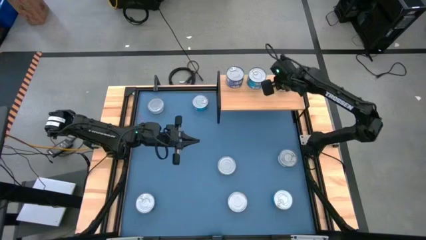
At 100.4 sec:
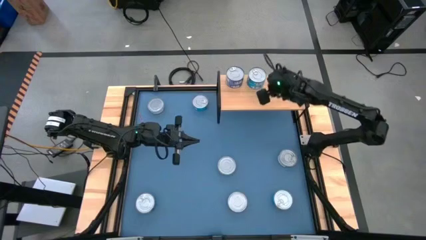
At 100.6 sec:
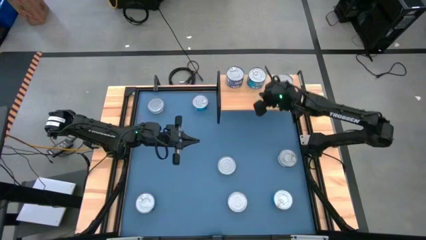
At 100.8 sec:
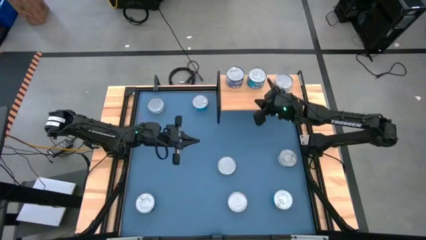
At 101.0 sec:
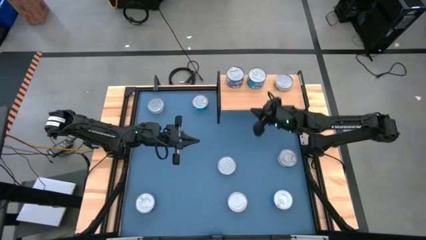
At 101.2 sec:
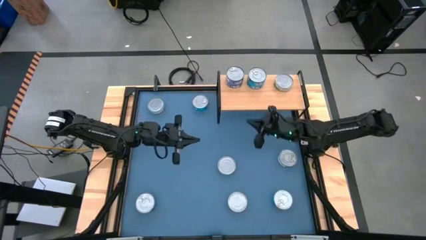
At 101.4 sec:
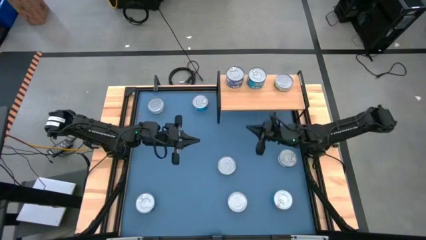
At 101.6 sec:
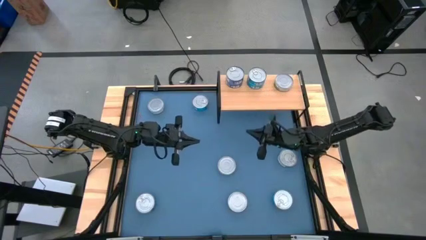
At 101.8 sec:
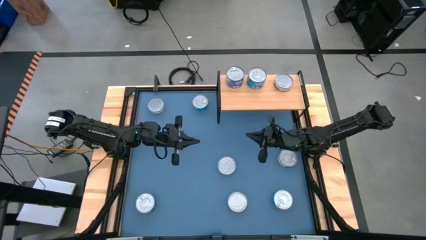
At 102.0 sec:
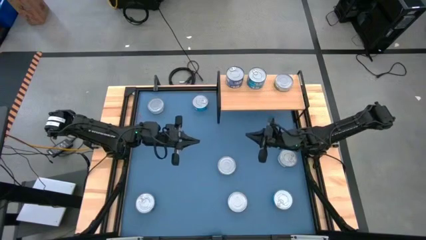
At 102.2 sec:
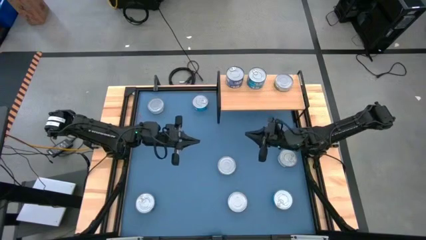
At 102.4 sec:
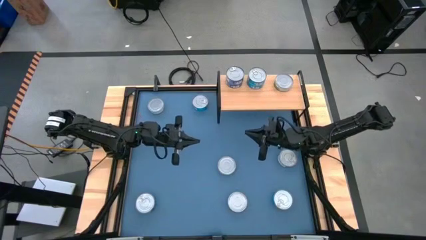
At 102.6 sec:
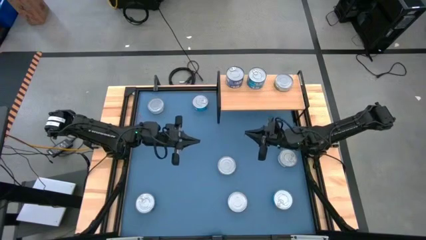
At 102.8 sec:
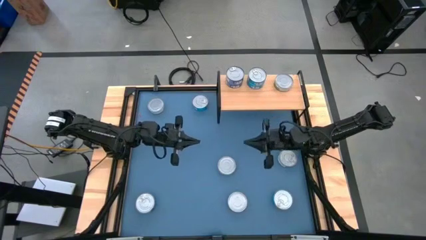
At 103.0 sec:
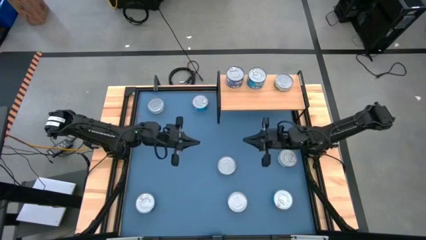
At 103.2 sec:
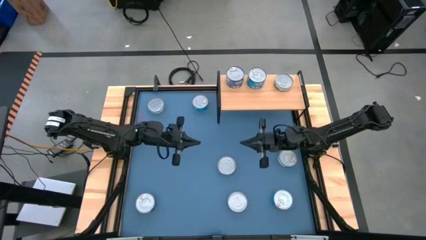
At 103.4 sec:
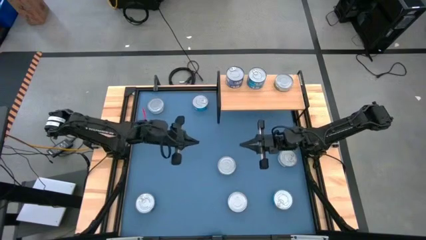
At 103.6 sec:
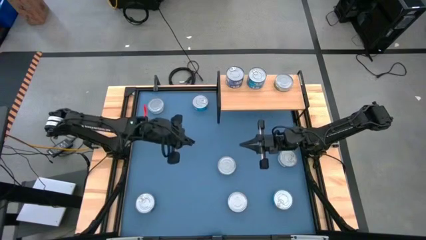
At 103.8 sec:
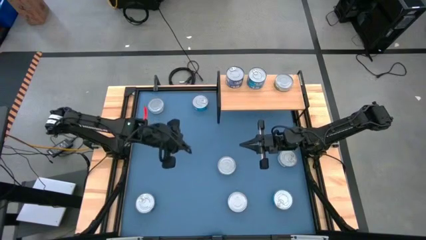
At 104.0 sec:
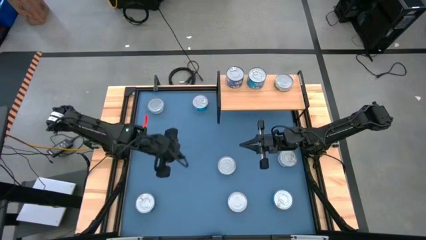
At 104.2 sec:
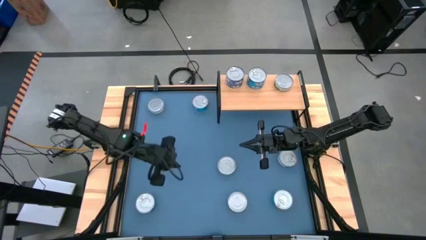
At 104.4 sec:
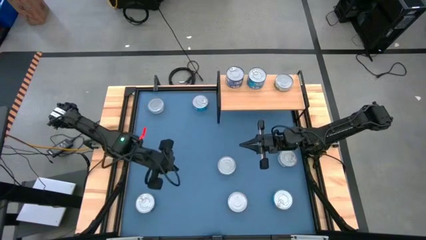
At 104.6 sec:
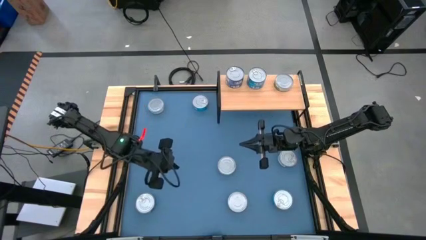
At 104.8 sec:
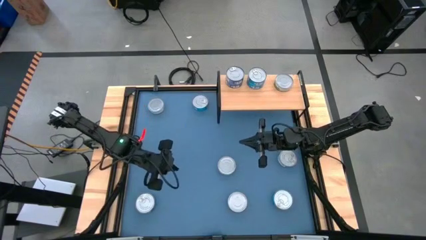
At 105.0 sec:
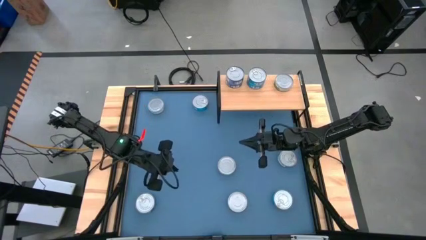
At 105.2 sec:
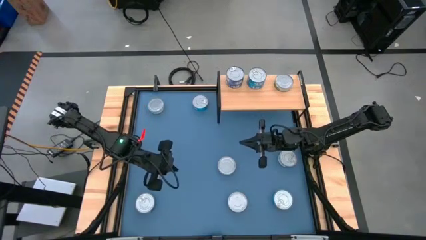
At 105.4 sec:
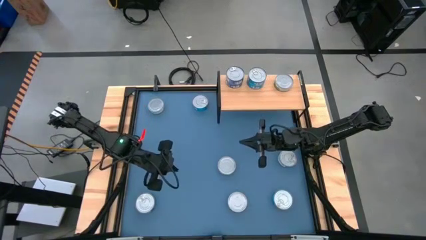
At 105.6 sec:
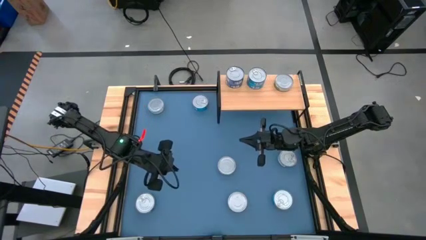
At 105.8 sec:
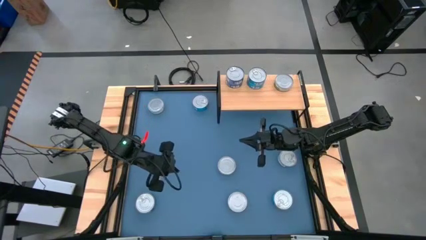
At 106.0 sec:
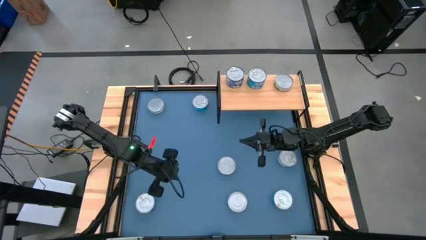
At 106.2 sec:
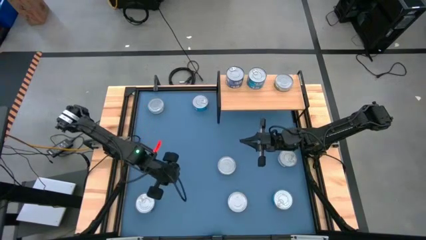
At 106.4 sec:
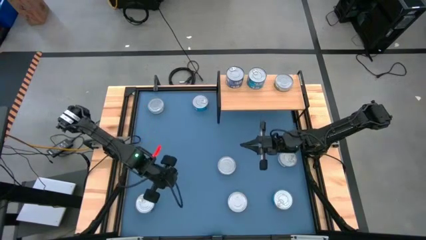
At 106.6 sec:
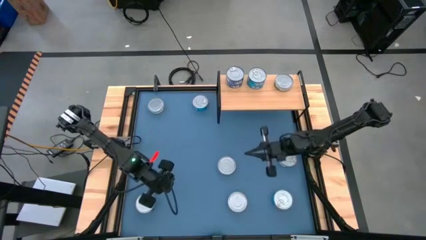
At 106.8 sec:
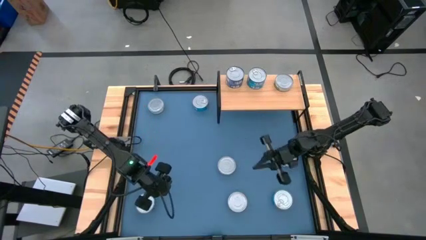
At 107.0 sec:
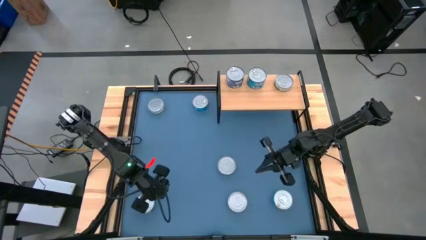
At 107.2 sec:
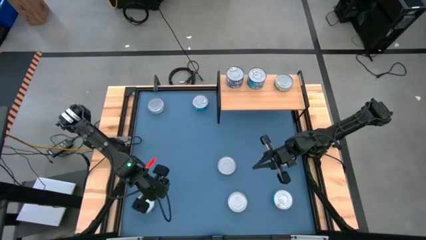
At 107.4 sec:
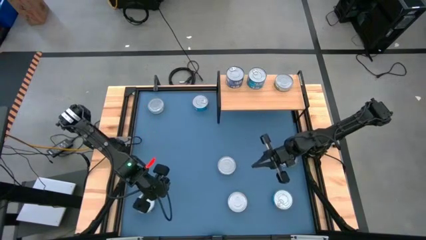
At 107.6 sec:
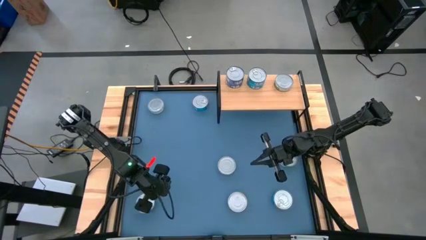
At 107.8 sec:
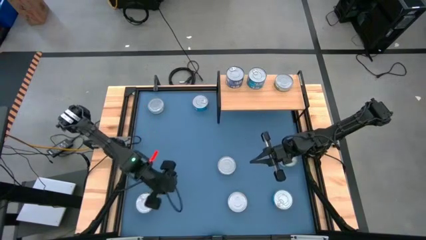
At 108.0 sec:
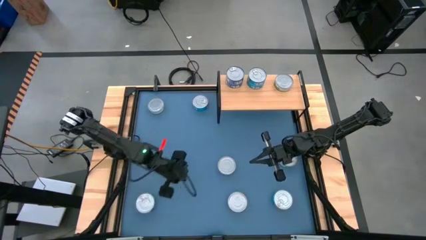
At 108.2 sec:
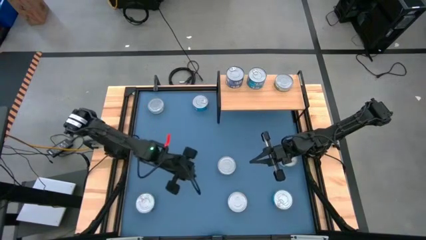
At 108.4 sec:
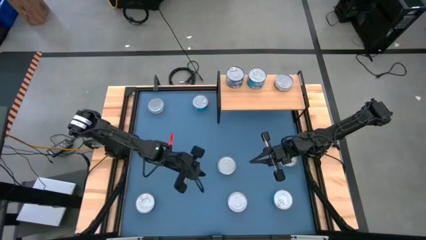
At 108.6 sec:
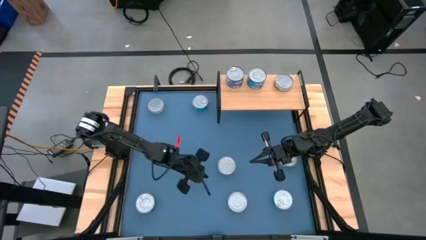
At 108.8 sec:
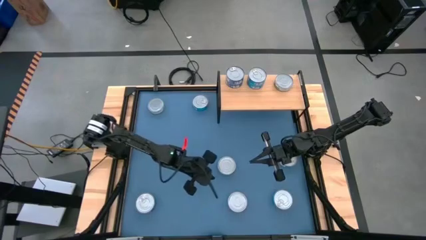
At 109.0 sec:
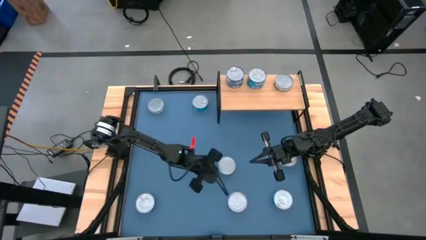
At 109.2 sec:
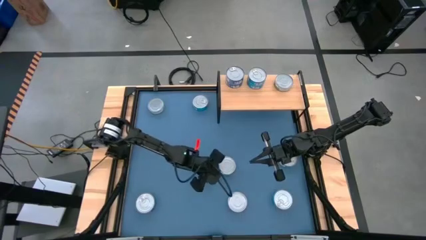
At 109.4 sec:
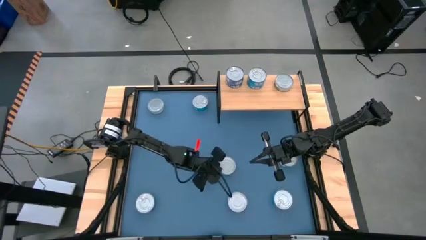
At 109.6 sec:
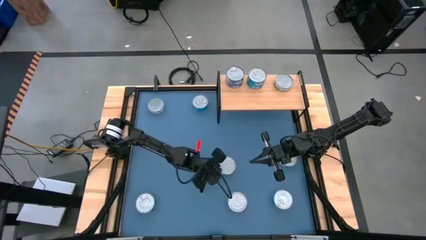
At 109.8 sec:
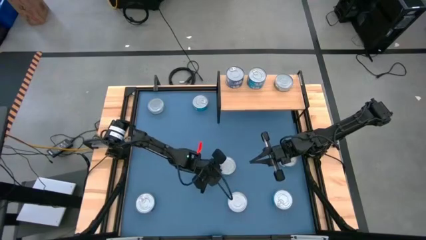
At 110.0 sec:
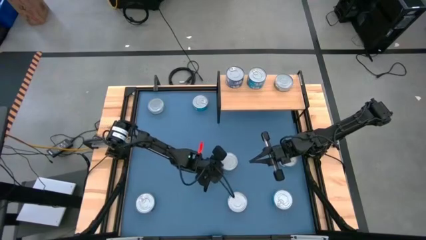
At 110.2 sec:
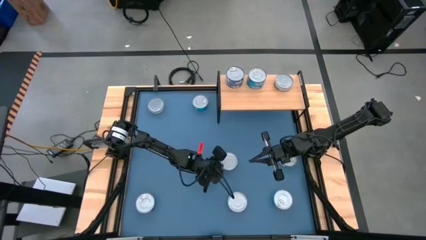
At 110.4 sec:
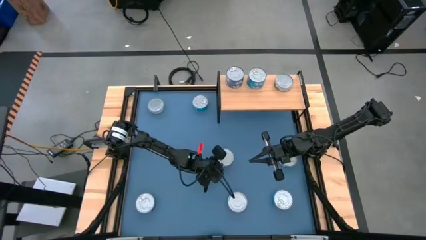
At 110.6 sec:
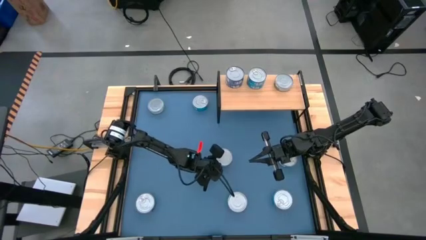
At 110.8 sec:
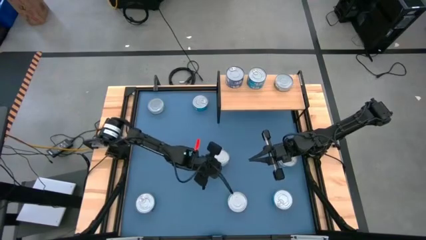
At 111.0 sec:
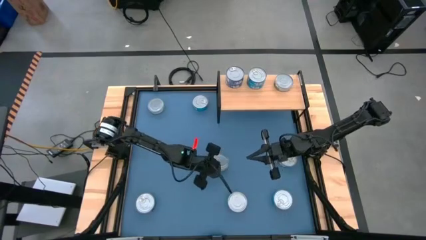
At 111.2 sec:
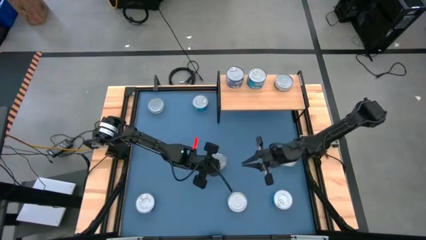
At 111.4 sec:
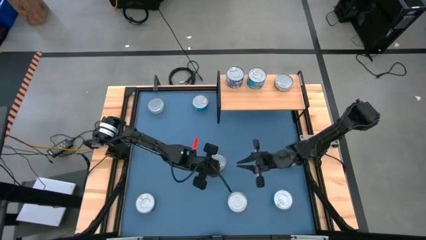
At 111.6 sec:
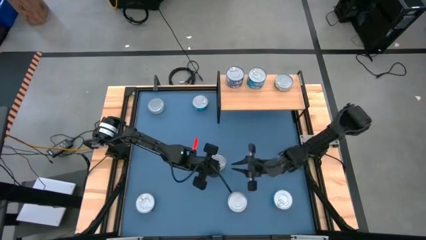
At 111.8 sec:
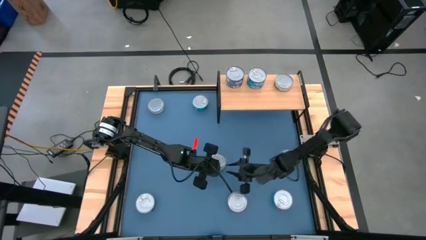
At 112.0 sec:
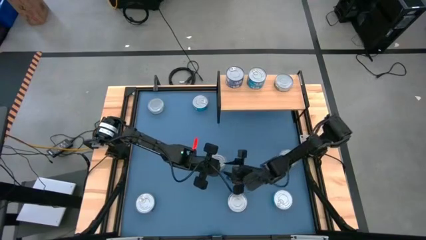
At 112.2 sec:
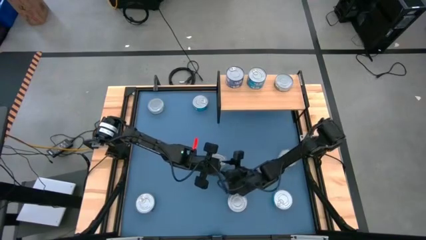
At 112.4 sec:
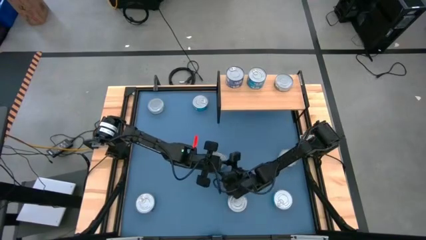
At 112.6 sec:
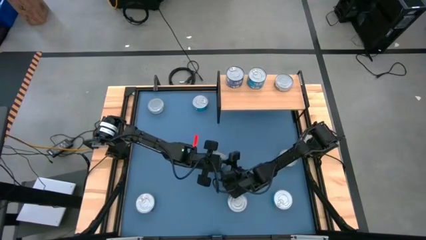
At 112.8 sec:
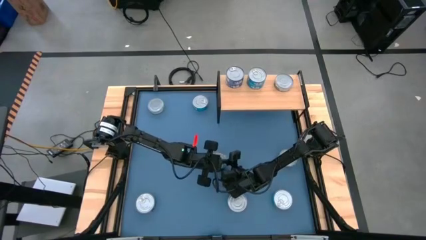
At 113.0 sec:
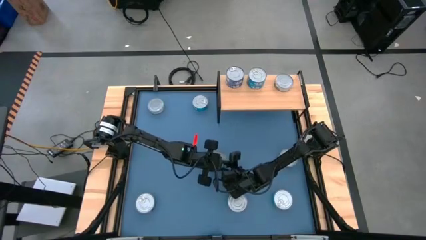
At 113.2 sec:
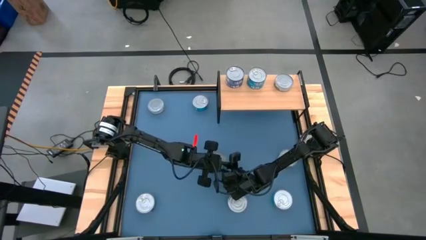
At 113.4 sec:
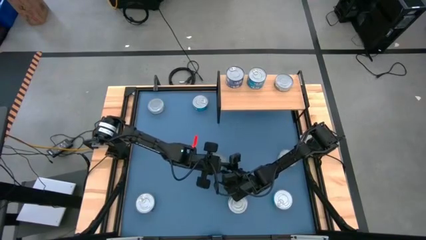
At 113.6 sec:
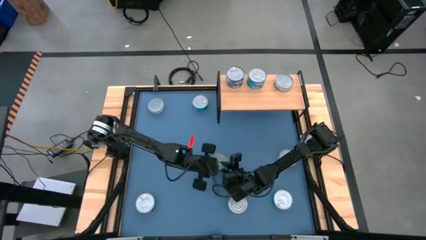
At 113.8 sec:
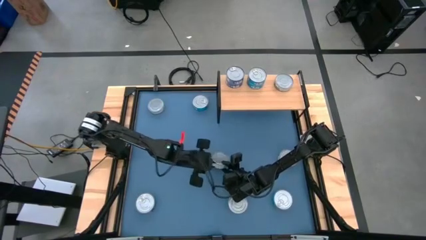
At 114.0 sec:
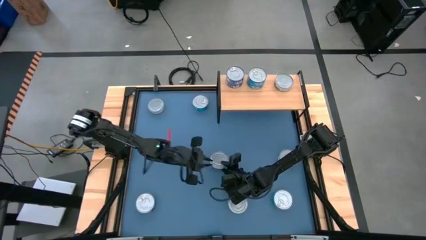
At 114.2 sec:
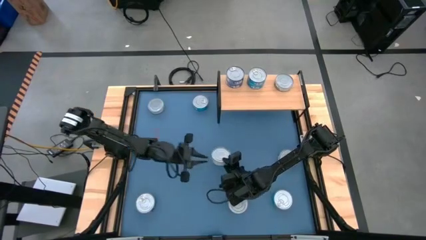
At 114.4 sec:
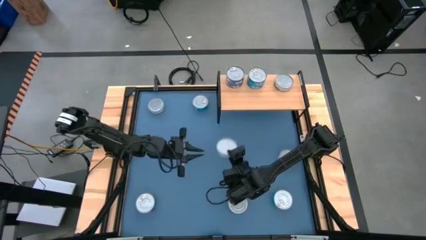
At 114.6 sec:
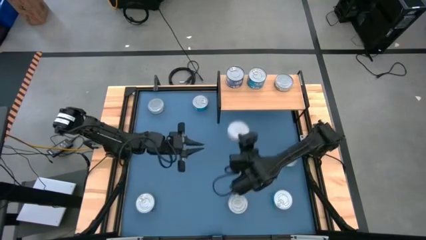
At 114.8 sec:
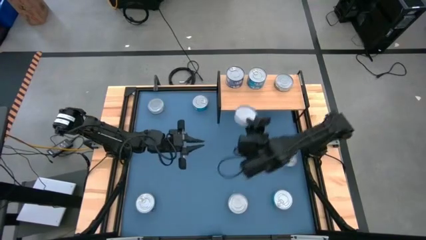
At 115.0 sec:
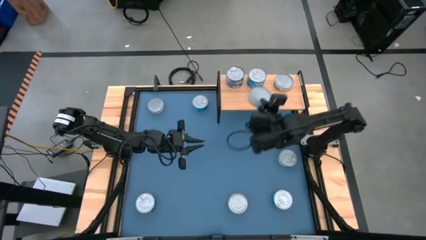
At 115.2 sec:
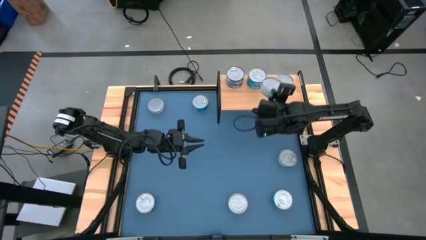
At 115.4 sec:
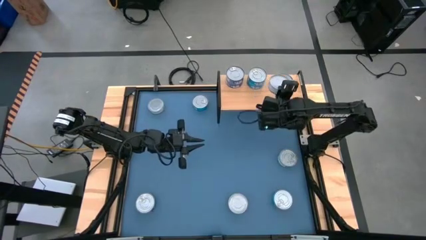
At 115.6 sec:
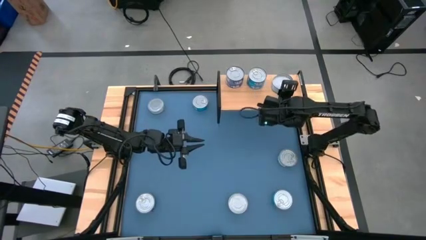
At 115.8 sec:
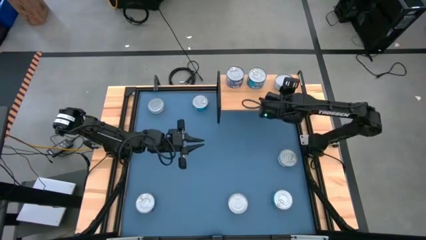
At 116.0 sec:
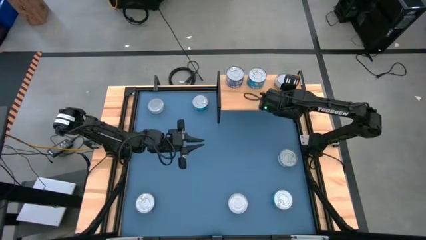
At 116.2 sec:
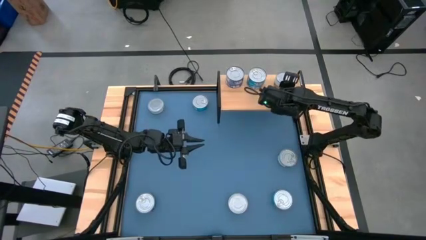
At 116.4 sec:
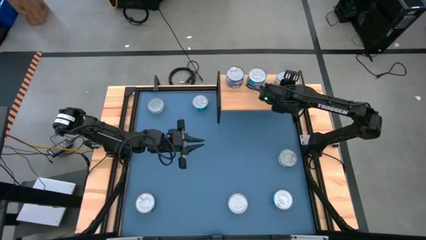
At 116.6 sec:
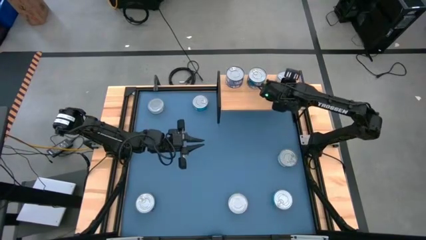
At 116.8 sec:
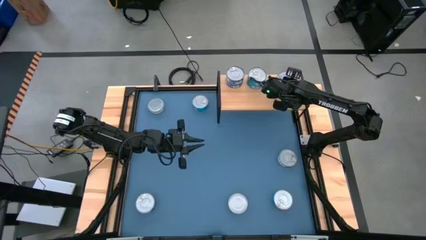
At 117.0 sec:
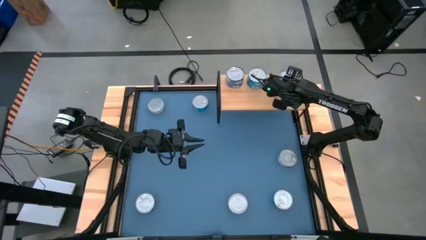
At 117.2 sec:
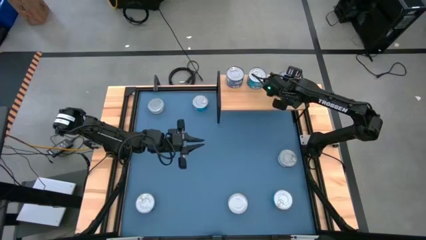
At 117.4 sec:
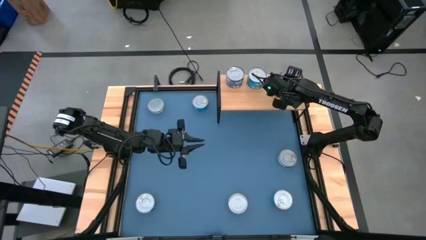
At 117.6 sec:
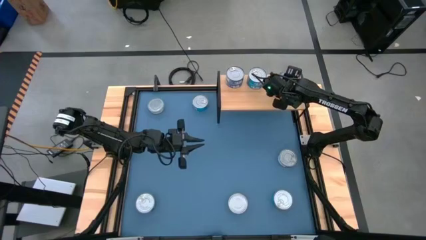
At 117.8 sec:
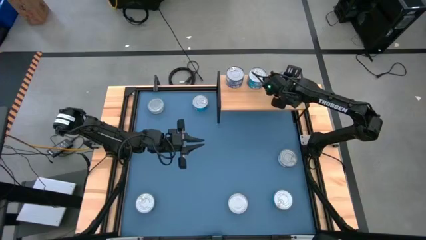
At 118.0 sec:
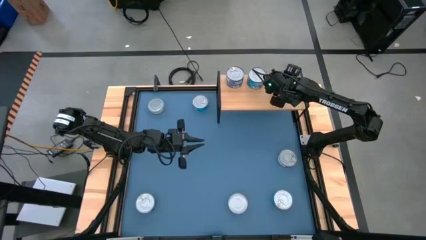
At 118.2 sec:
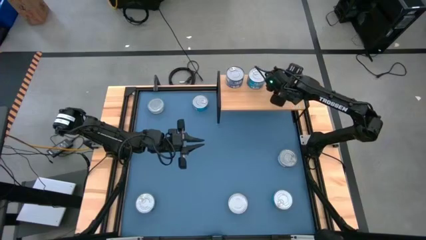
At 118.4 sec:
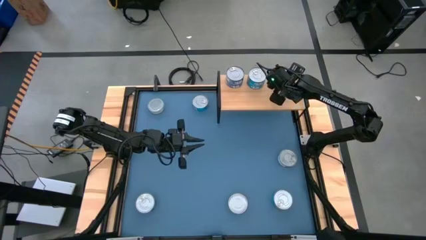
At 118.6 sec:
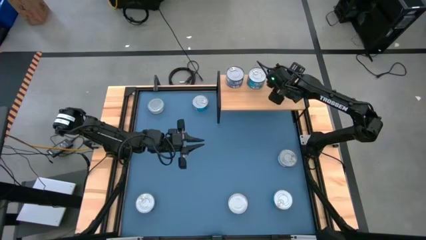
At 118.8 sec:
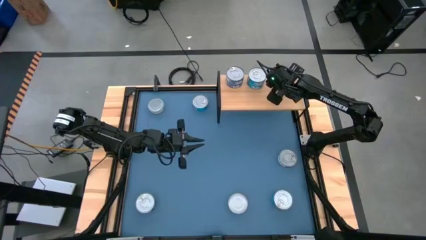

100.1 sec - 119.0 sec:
Task: Stack canned seafood by type on shelf
Stack the center green tuna can on top of the green tuna can on the shelf
